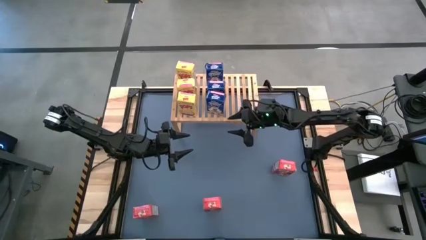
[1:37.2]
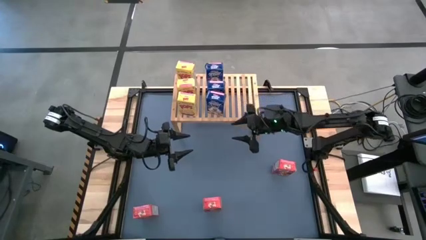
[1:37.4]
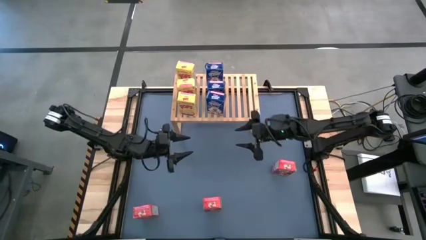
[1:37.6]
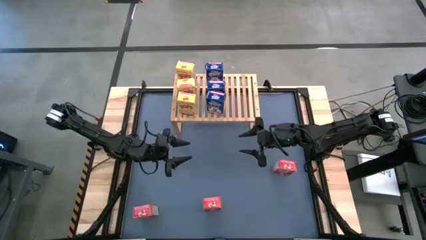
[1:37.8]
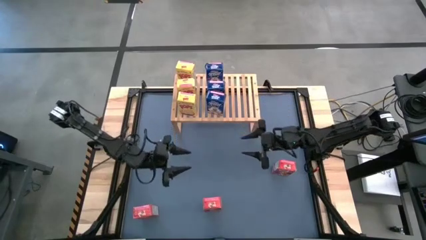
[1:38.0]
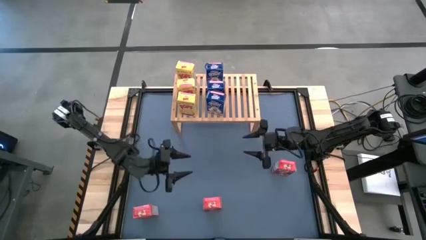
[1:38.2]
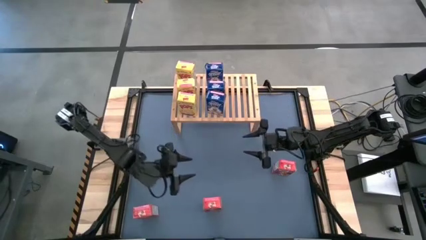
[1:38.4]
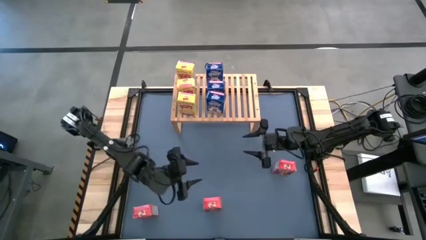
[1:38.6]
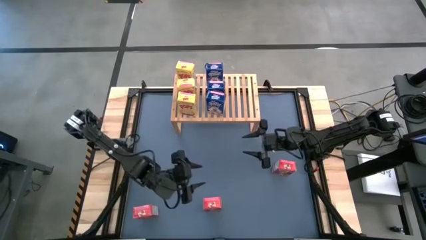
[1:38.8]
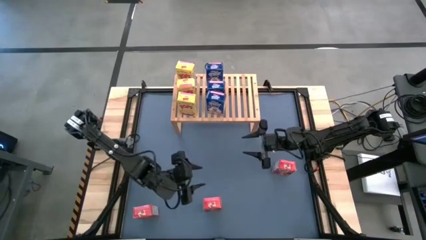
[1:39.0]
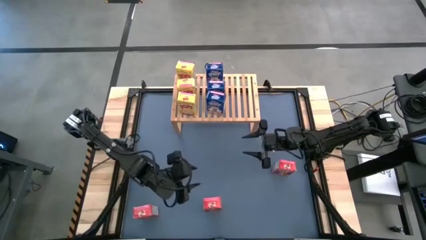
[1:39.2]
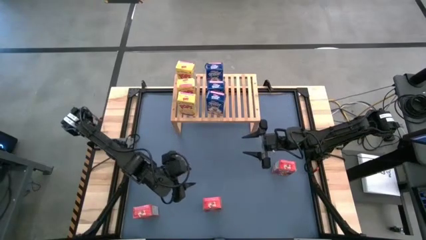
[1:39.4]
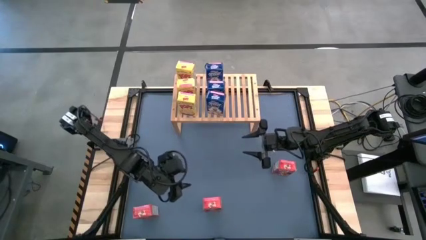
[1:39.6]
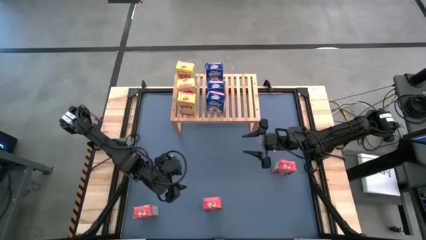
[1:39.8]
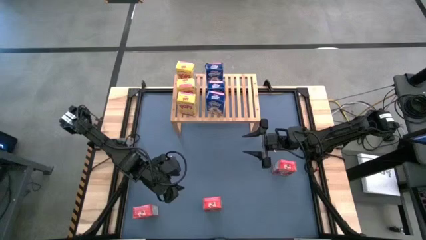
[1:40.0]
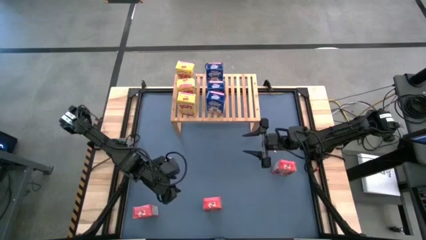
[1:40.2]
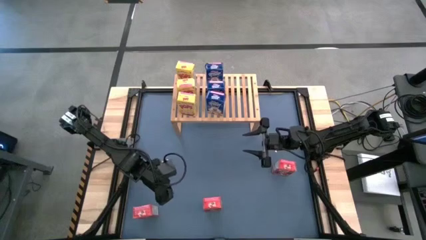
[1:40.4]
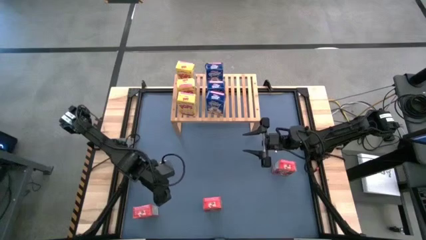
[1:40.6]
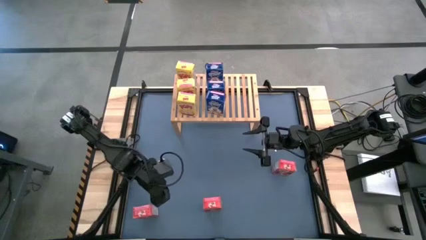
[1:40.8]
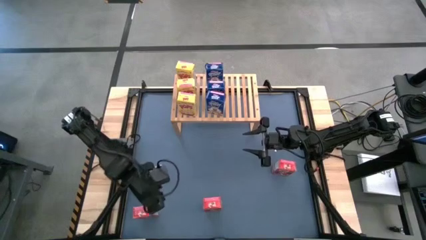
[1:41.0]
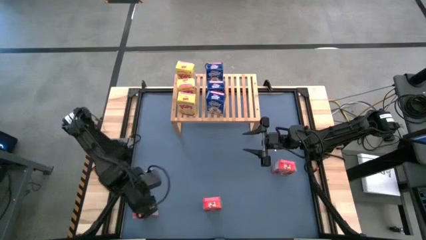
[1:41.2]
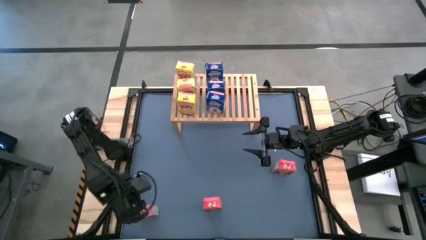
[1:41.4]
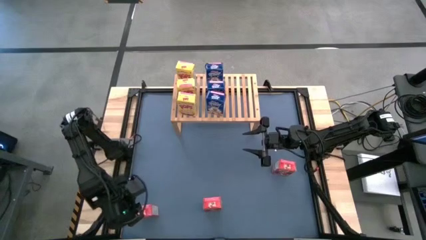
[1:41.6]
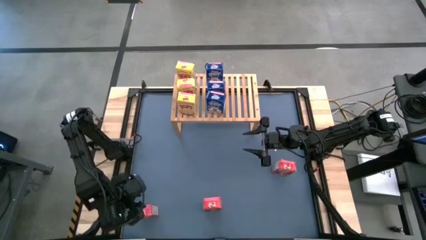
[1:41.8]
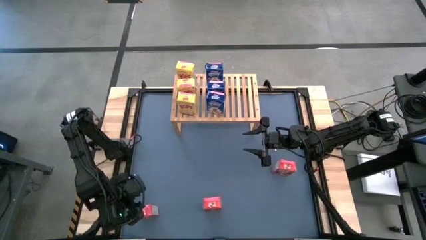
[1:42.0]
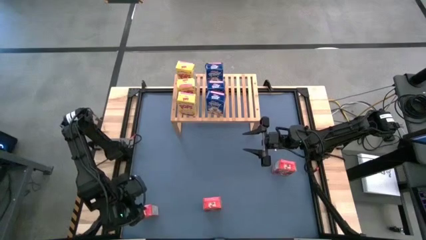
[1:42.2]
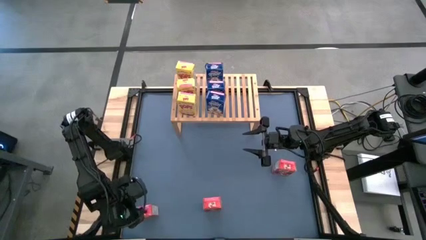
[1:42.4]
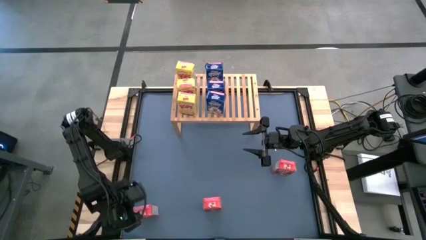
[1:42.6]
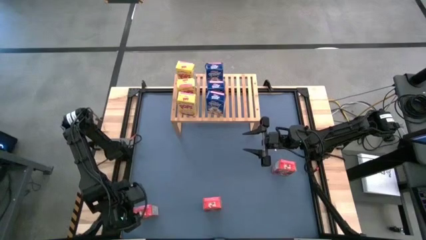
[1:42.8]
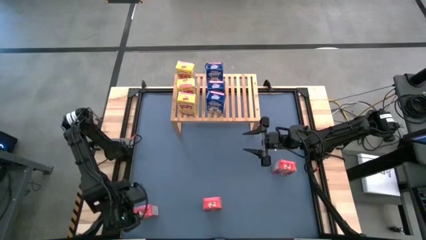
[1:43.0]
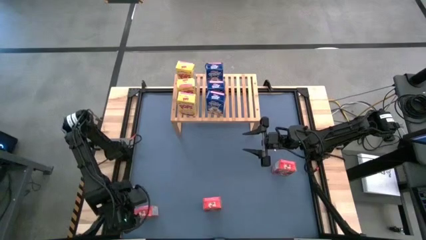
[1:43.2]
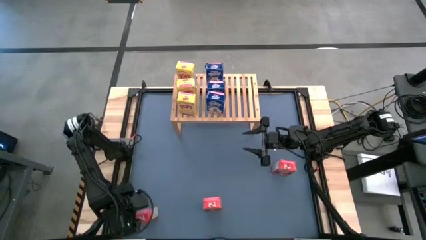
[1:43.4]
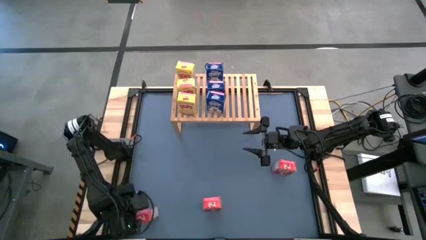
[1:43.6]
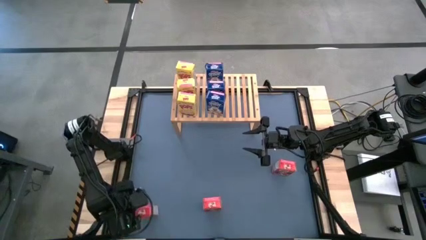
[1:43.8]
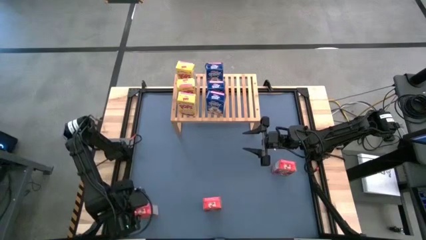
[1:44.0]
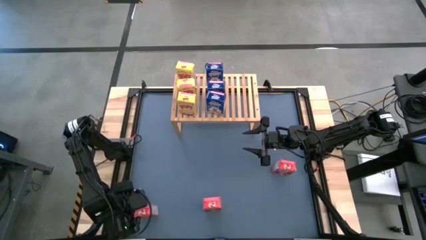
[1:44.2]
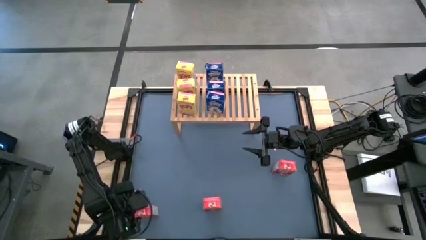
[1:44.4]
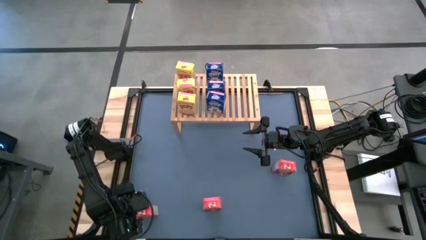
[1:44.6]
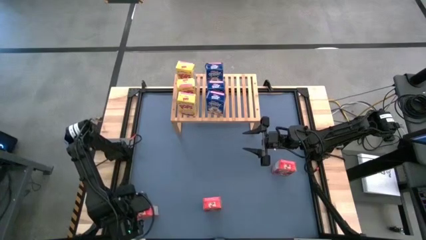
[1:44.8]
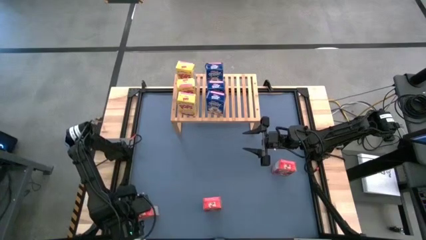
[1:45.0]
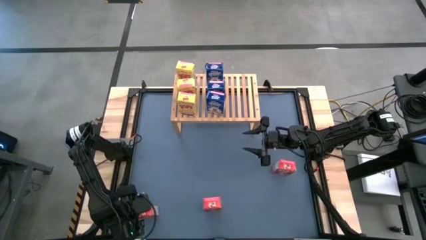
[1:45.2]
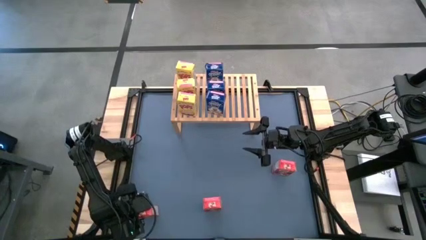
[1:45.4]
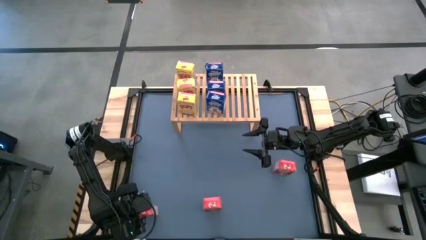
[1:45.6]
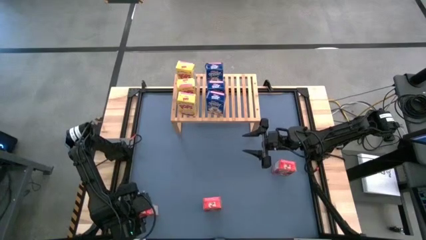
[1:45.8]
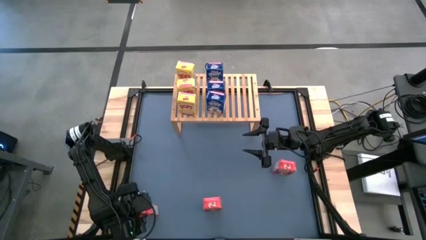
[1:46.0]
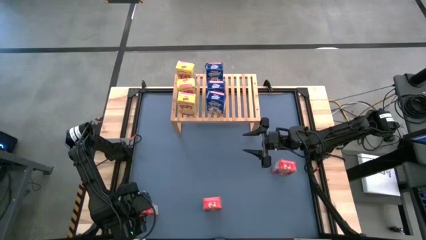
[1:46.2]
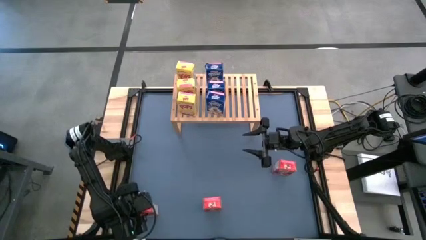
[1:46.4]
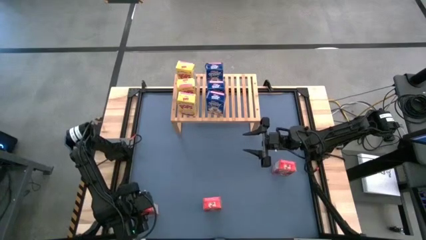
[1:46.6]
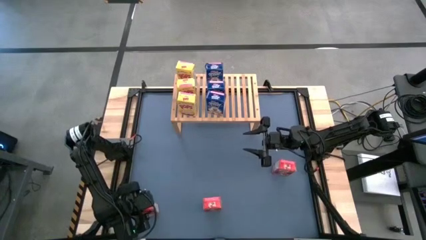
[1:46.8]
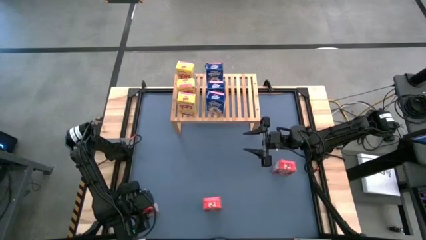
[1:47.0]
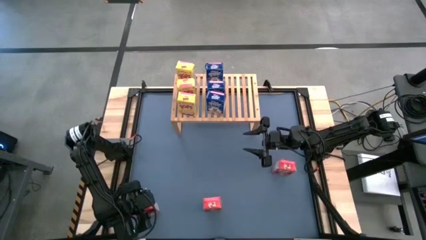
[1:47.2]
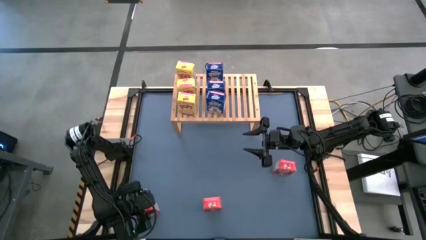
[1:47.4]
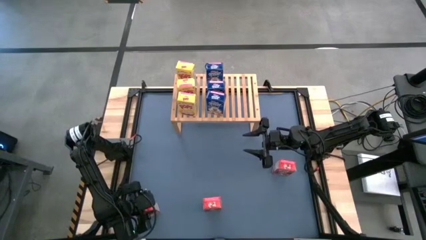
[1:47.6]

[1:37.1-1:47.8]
Task: Stack cereal on shelf
Put the bottom left red cereal box on the shelf
